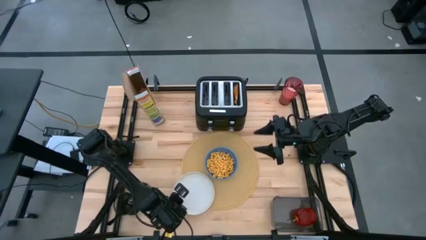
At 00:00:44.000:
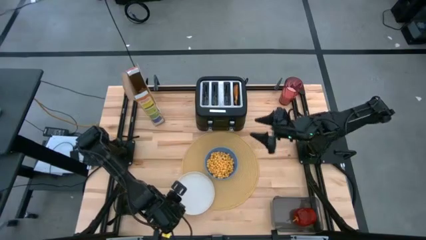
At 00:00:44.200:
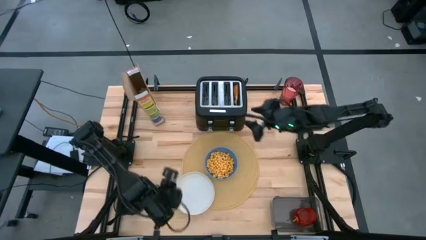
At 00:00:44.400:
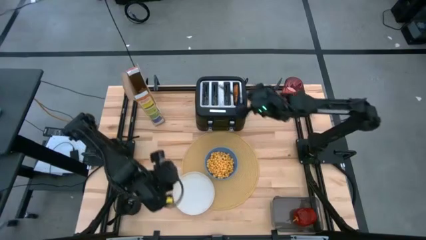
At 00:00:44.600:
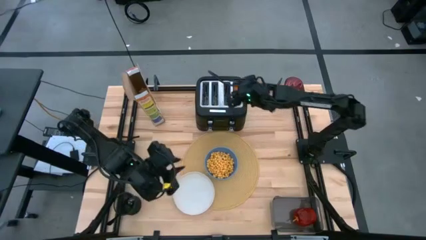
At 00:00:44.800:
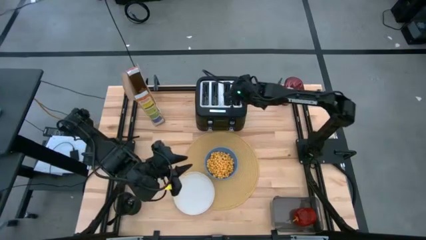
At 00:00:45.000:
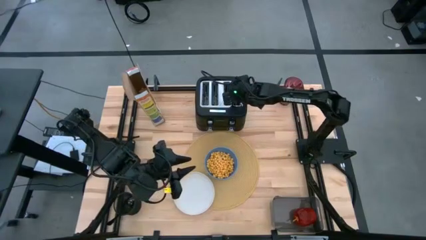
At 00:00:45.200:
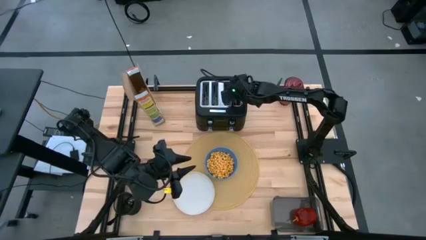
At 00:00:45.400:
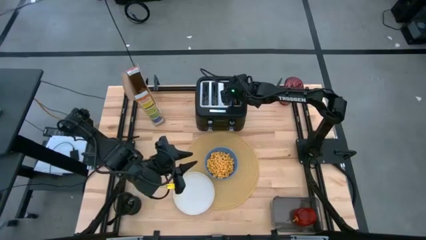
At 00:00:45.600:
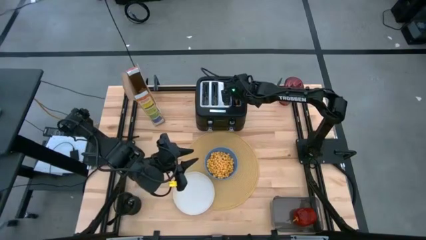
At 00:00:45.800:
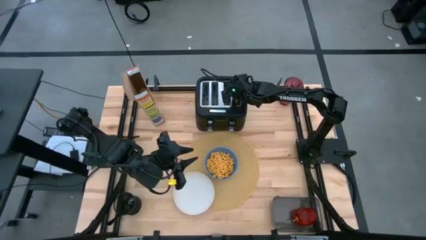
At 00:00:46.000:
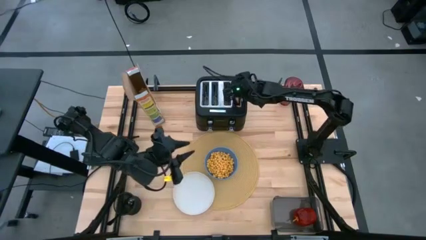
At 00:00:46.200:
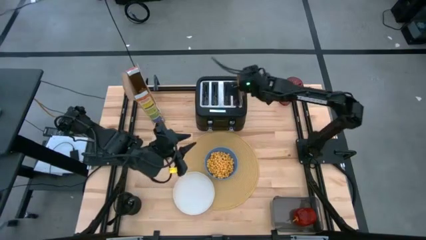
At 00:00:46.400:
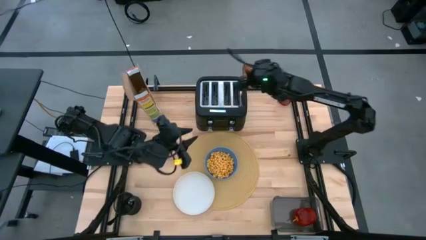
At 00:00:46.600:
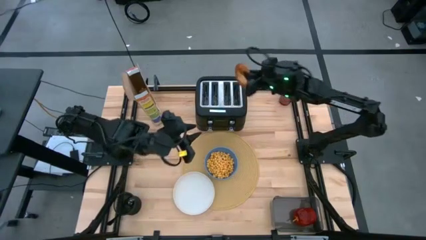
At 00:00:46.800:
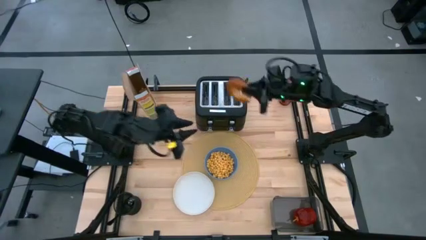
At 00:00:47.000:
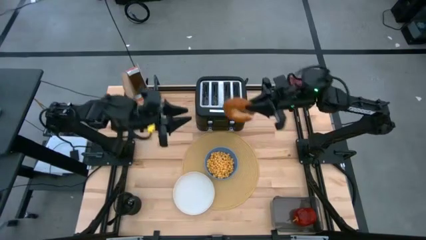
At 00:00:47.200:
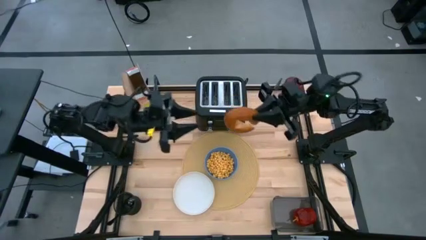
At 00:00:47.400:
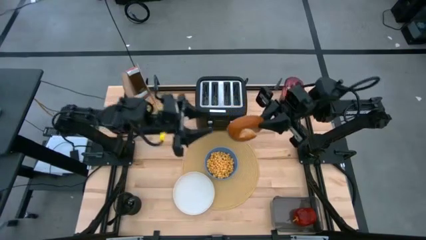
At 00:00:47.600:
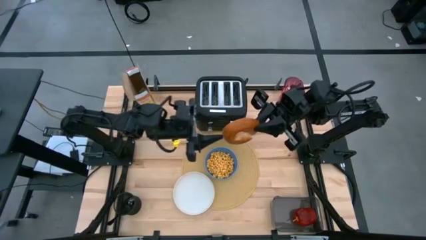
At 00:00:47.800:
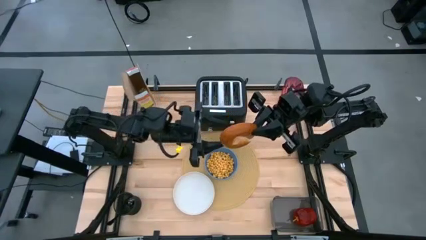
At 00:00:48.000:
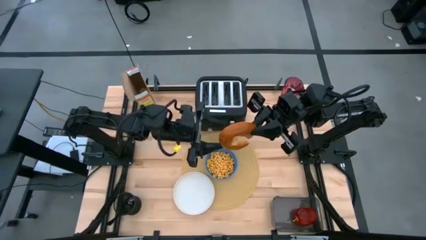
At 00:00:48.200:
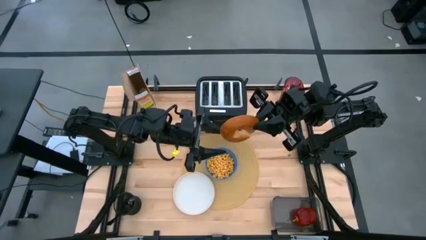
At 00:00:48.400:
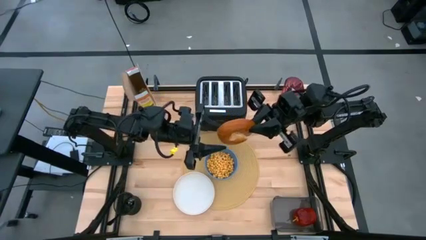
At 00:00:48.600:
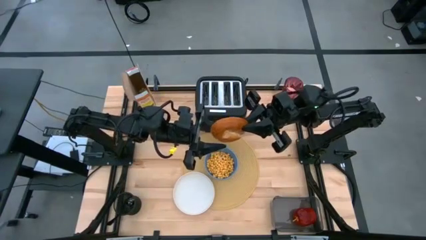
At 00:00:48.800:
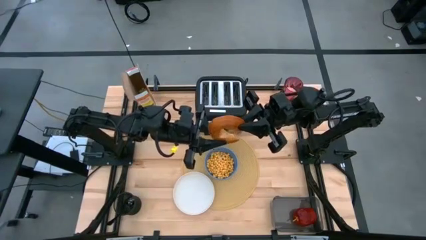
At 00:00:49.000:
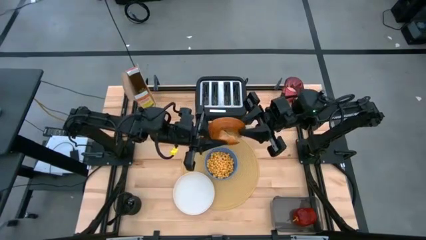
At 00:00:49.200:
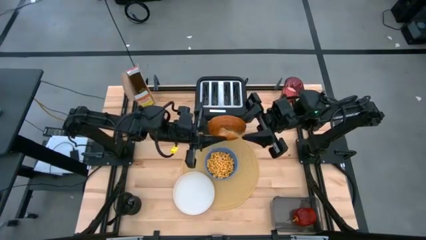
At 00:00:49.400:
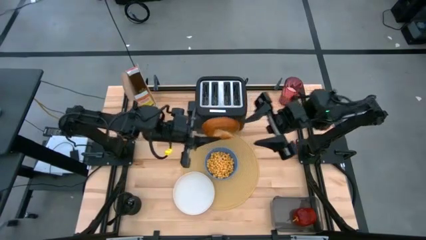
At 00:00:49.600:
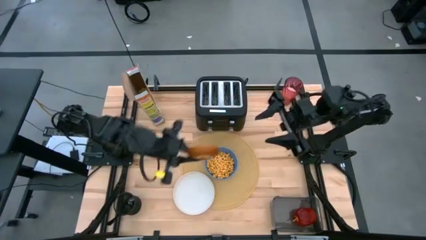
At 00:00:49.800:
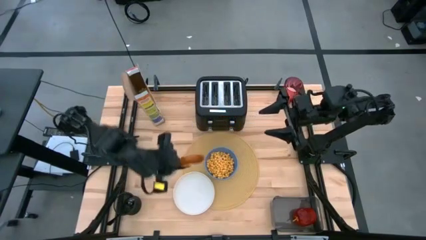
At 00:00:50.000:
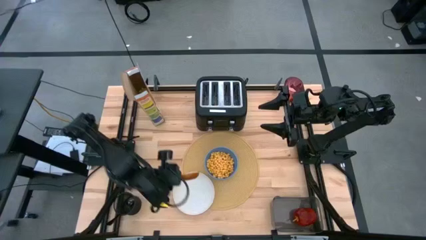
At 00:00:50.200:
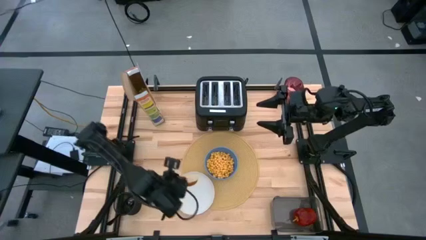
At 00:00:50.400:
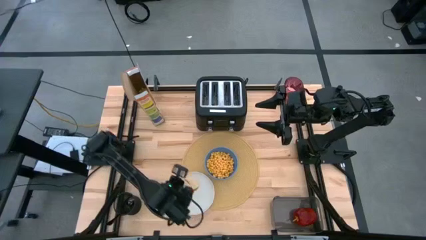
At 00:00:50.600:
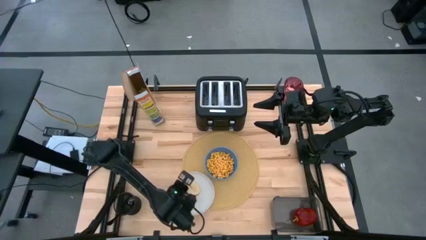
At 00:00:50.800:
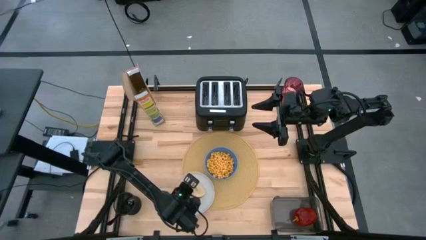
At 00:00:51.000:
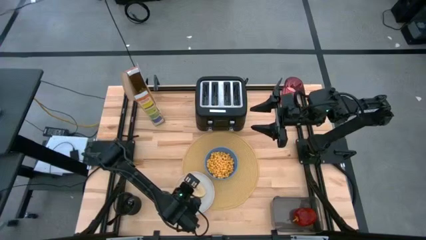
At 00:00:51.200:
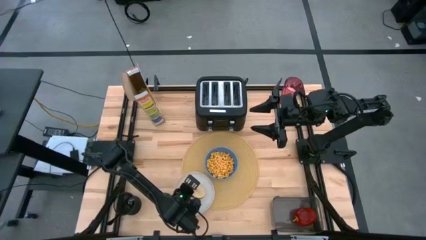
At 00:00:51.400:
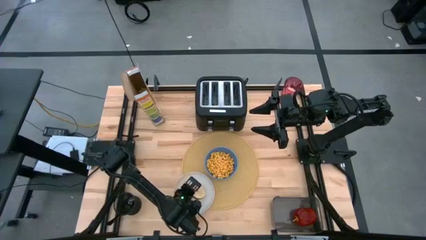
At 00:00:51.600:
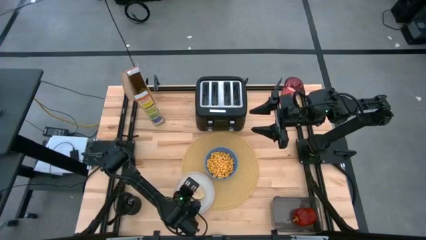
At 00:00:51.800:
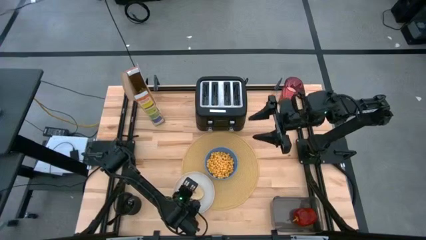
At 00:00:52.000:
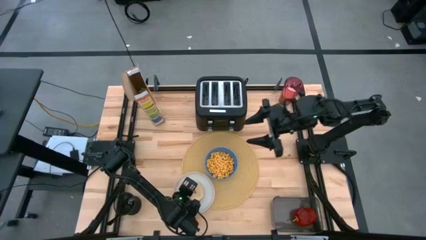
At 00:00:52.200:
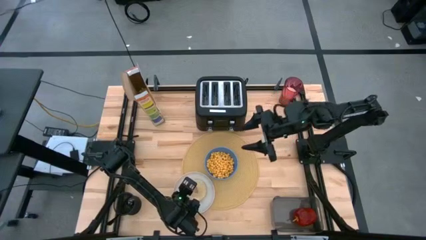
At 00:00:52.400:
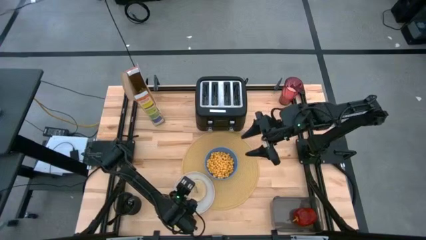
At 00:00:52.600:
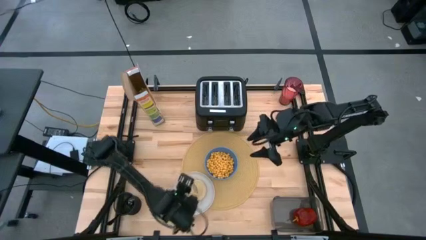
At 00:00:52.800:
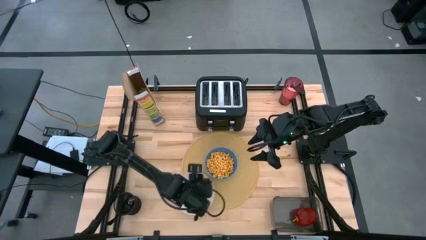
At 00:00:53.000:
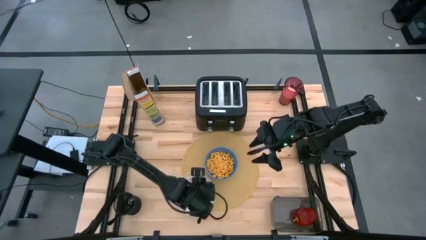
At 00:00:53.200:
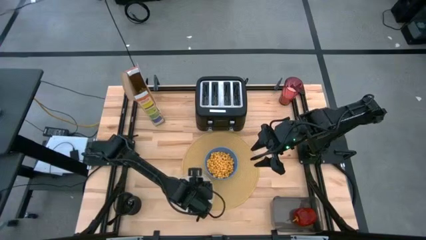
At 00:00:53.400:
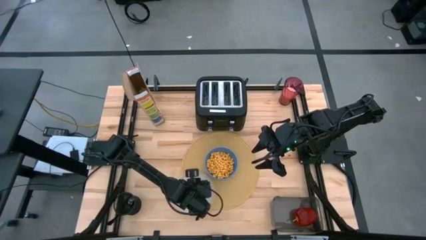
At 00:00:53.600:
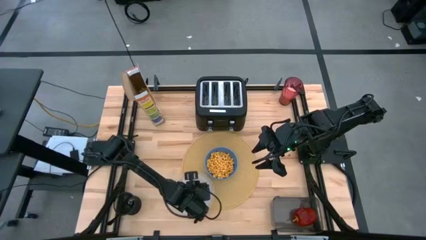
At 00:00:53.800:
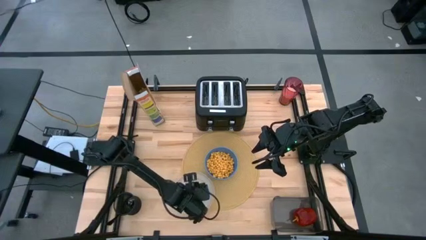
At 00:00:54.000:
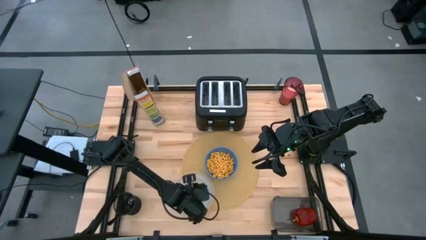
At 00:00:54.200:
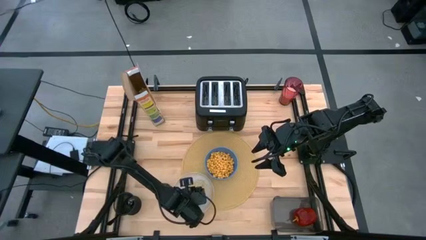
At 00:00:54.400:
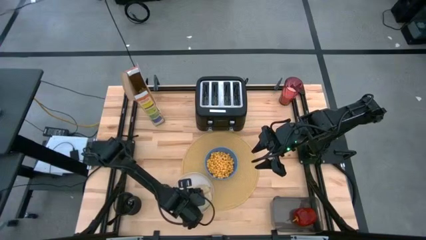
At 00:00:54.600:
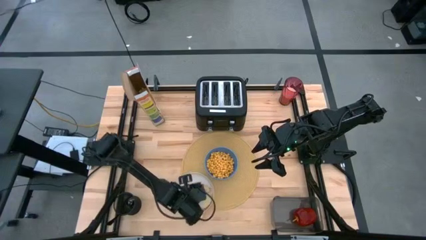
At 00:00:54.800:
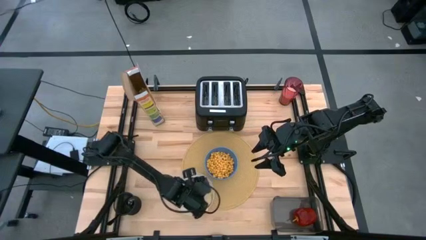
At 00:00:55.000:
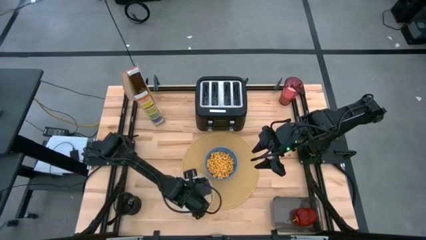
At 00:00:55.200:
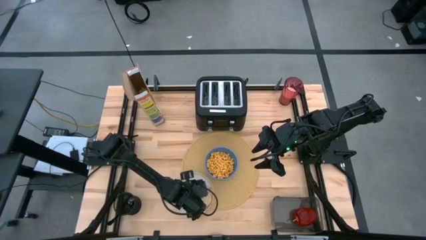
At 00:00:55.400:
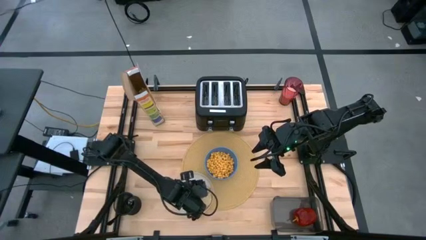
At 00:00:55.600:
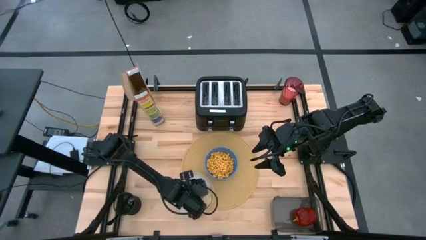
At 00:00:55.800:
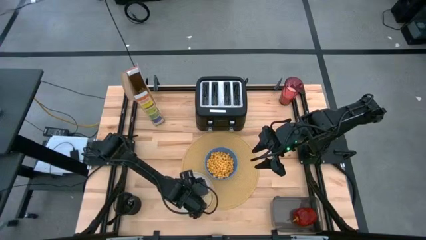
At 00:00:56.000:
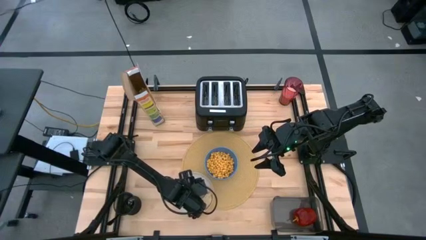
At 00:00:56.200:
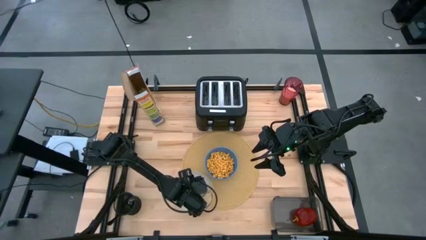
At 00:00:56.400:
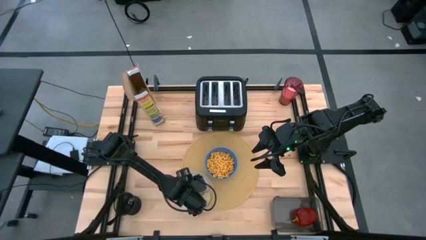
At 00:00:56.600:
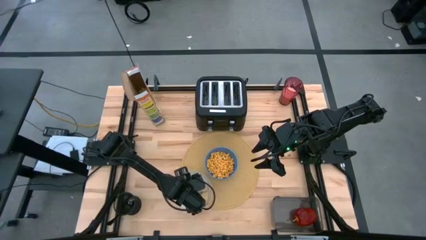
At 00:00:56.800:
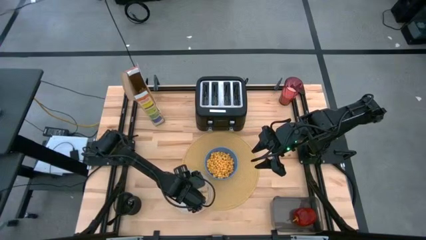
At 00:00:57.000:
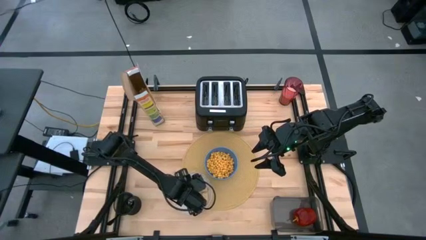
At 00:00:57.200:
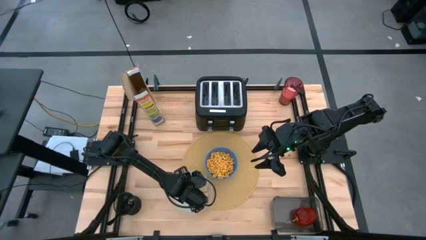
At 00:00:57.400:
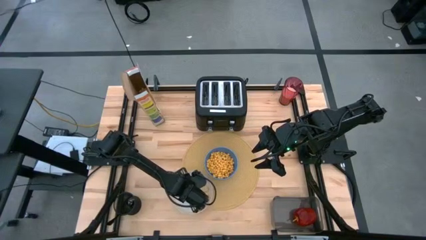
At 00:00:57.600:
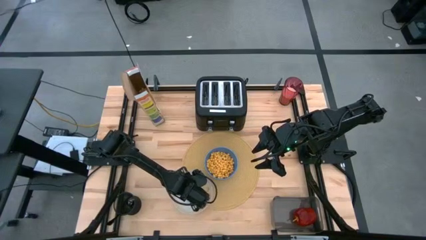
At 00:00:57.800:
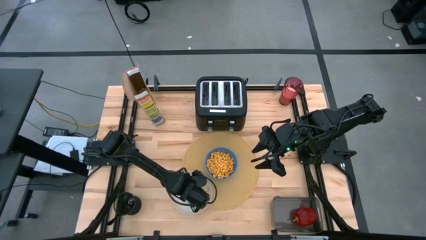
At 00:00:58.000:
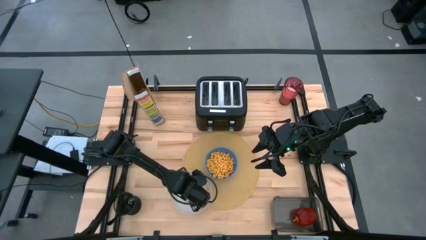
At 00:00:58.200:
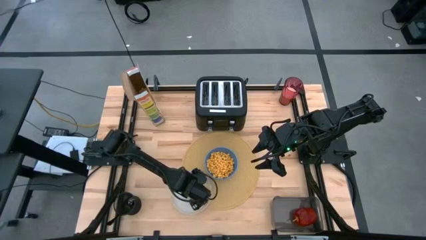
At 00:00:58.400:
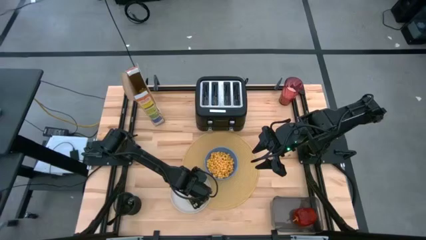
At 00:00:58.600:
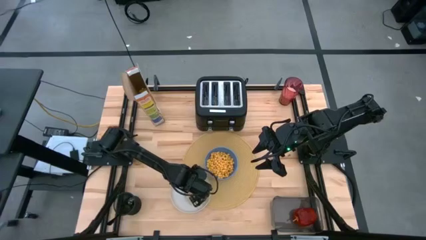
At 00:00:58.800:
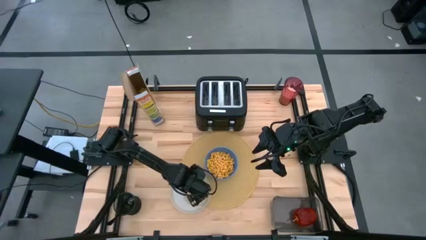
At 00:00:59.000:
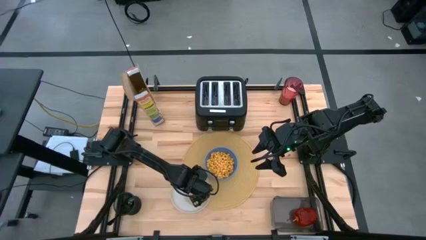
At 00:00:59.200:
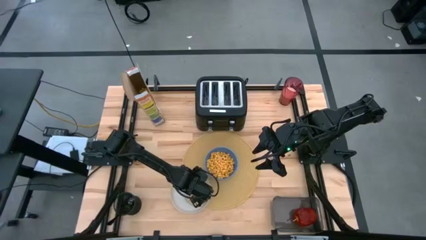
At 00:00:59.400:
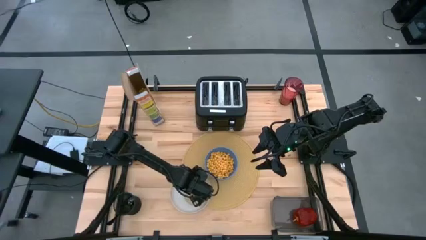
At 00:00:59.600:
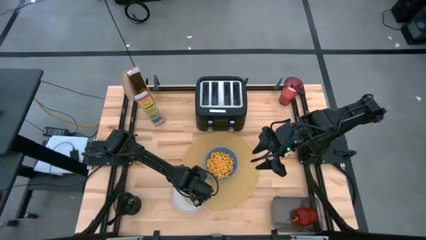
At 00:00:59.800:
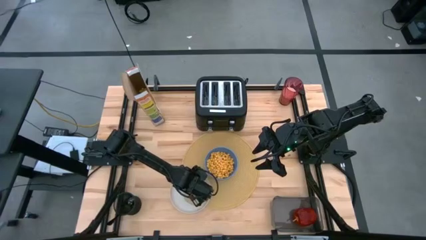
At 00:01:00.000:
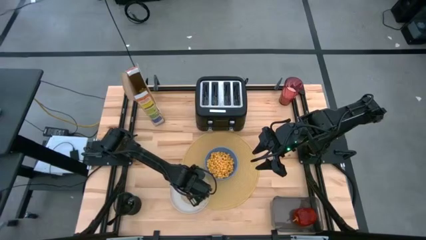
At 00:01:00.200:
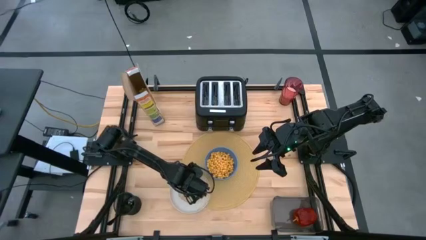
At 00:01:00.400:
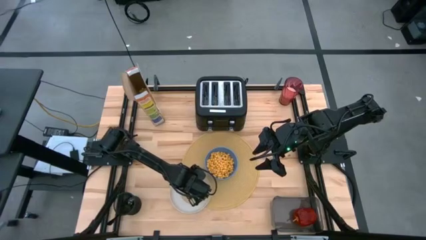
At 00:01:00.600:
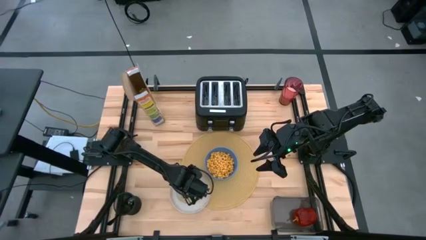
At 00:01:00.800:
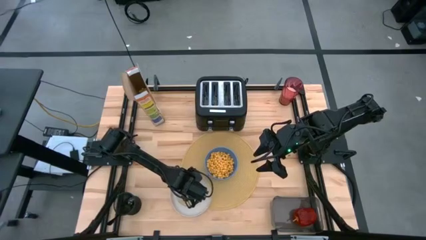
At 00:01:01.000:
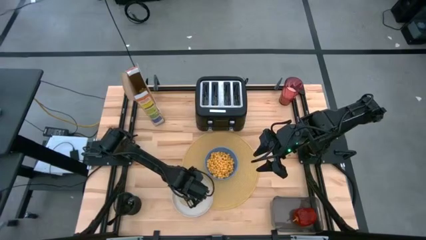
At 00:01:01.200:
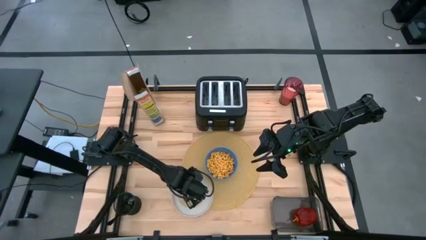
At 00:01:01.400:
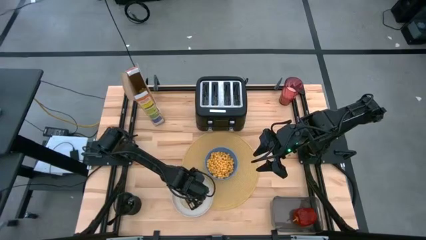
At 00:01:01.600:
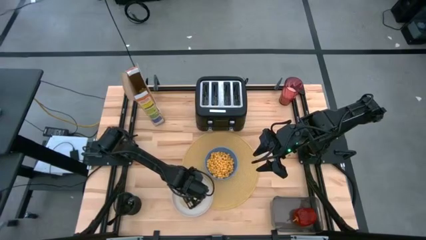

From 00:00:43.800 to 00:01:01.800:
Task: Arrange a breakfast setting
Put the toast bread on the white plate
